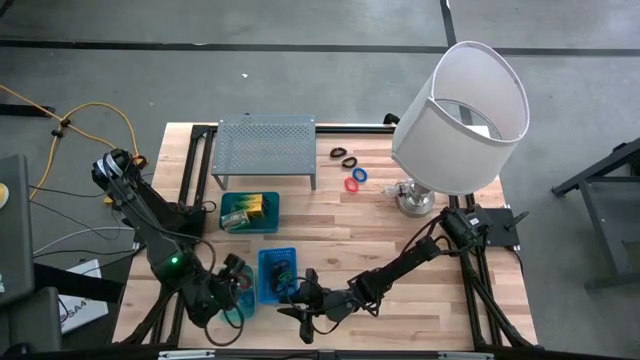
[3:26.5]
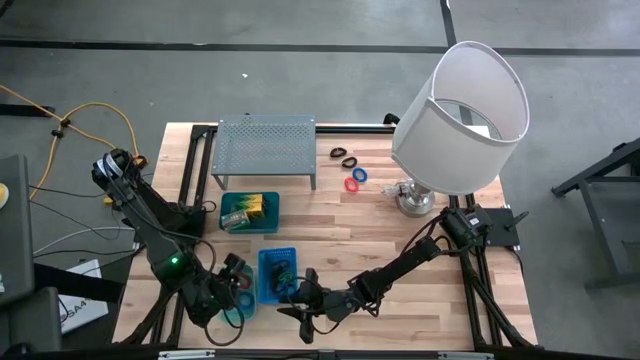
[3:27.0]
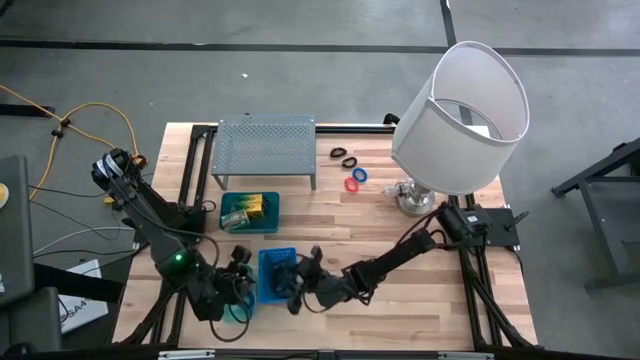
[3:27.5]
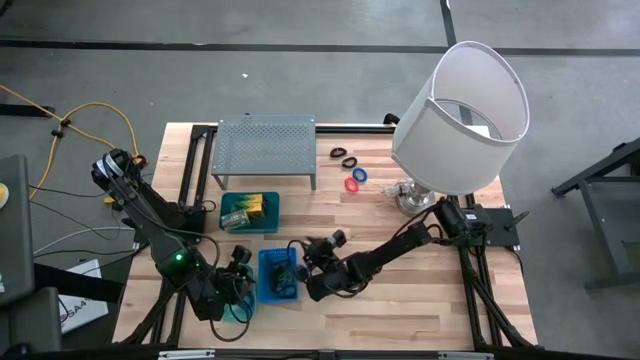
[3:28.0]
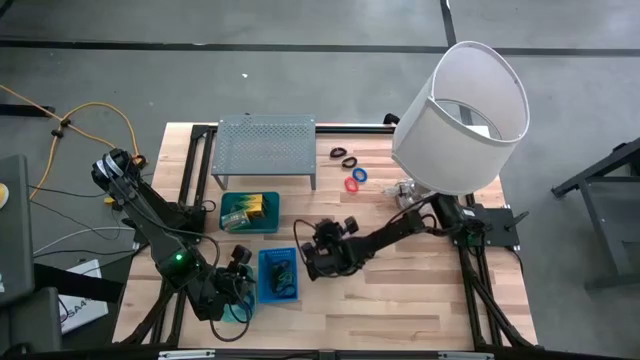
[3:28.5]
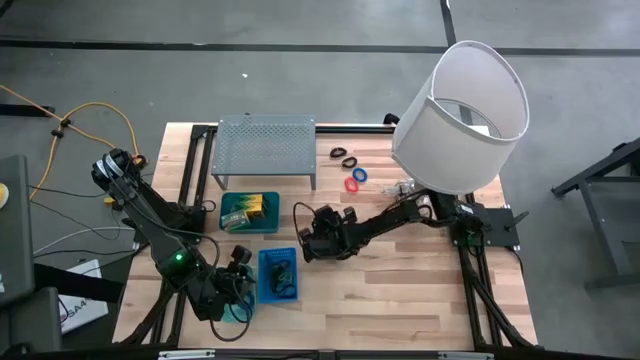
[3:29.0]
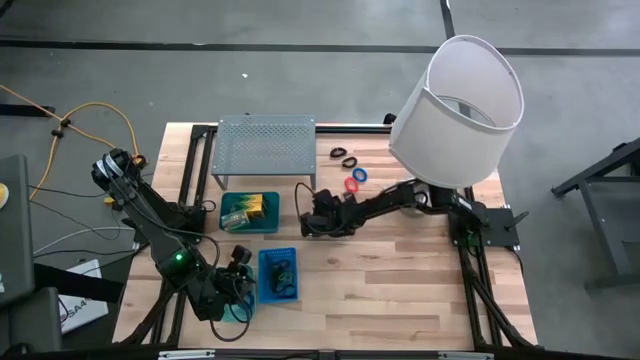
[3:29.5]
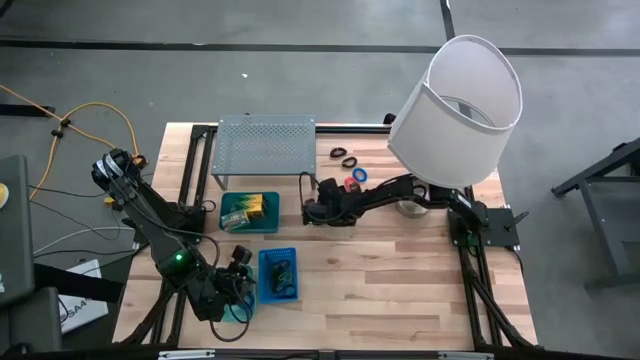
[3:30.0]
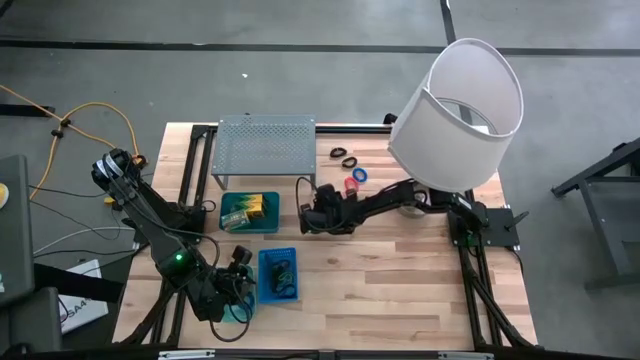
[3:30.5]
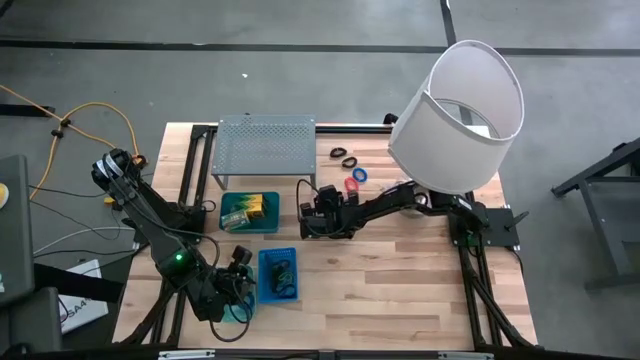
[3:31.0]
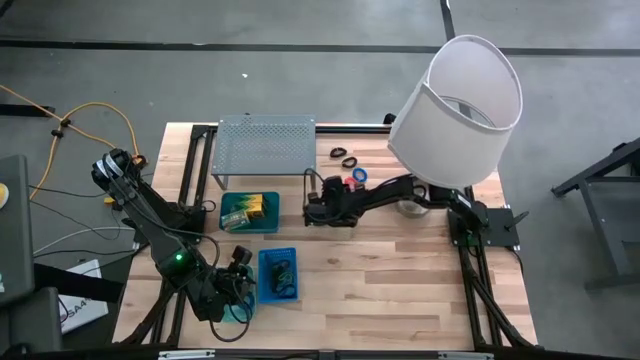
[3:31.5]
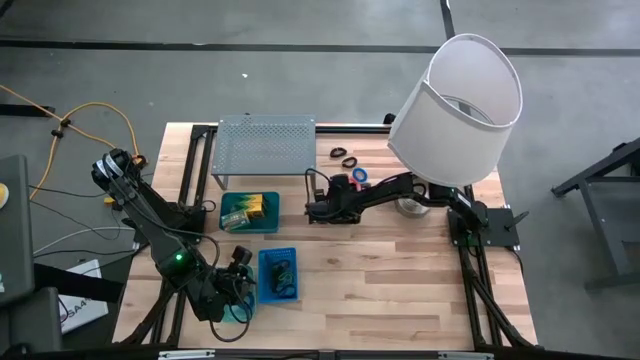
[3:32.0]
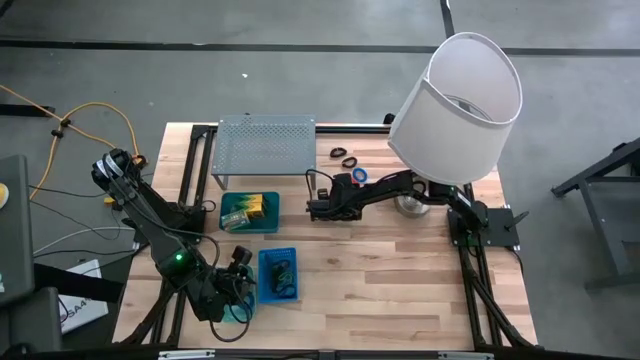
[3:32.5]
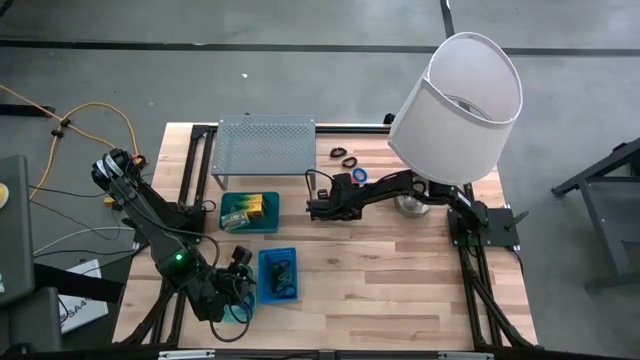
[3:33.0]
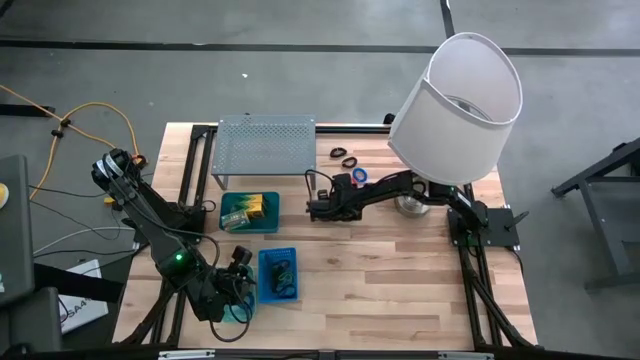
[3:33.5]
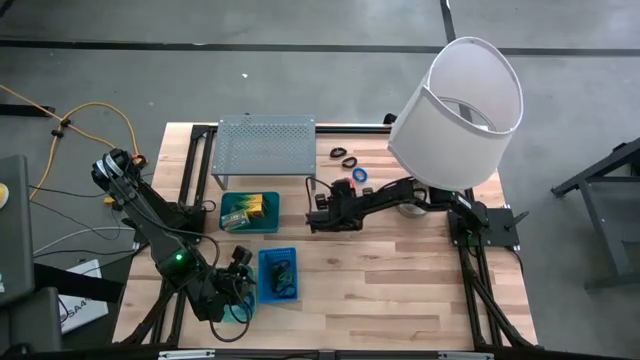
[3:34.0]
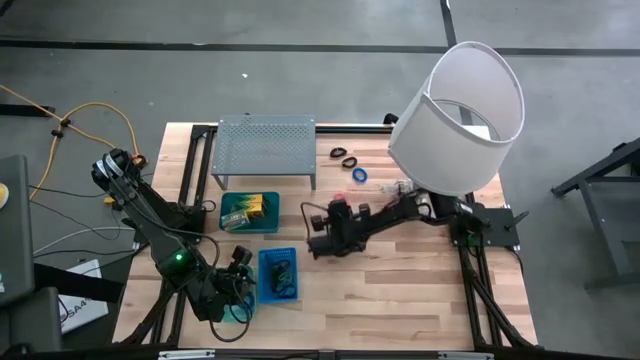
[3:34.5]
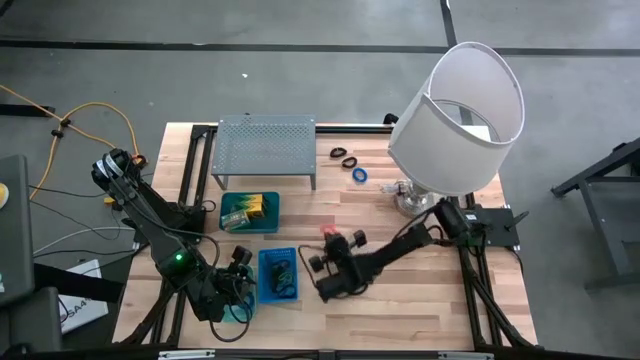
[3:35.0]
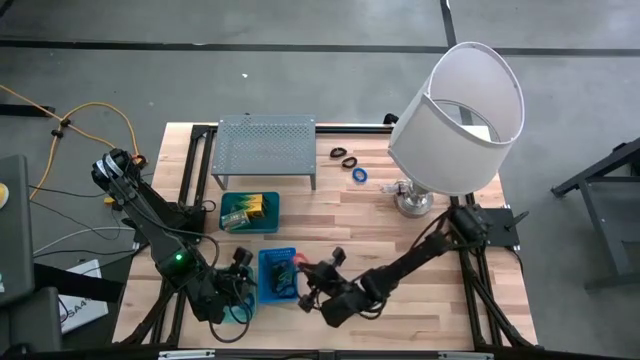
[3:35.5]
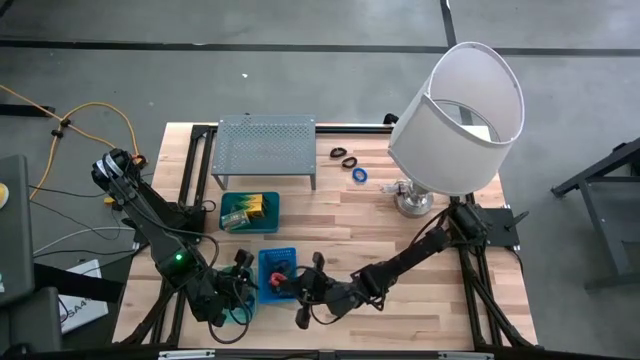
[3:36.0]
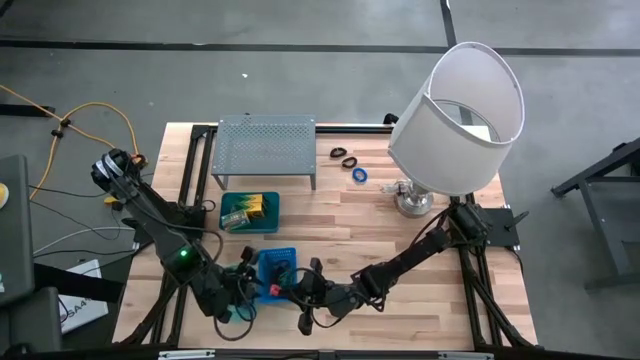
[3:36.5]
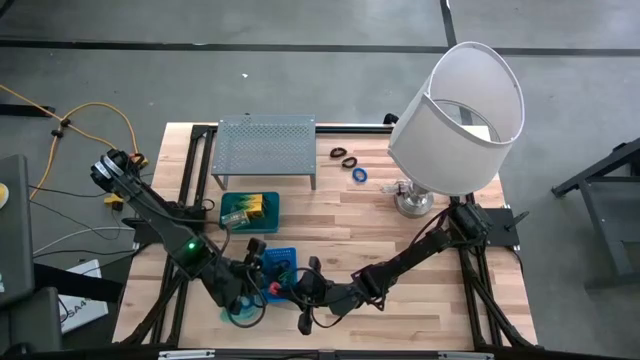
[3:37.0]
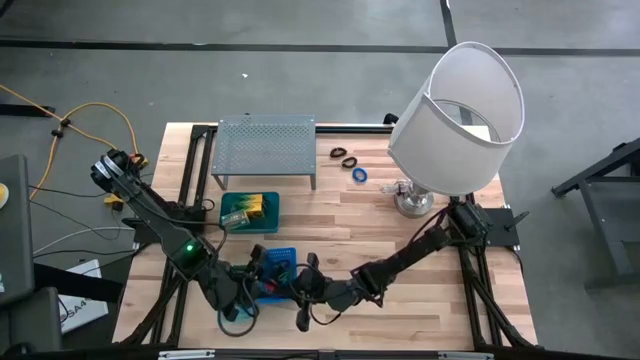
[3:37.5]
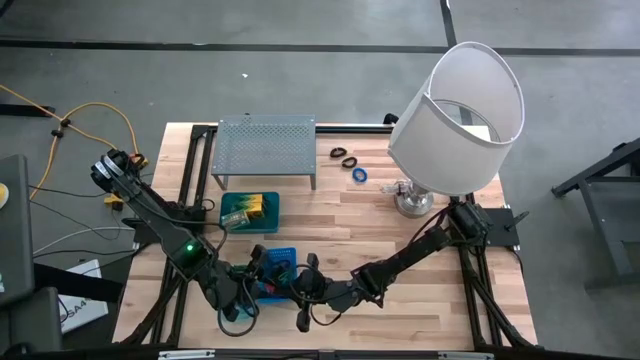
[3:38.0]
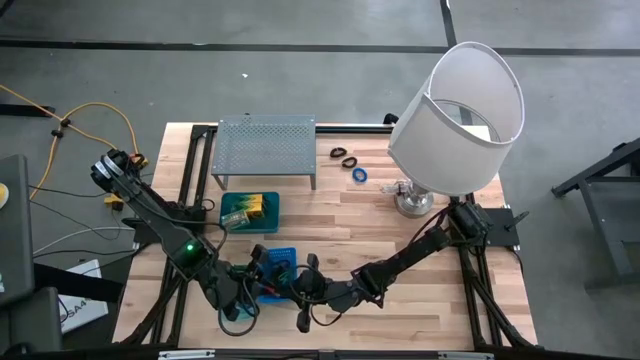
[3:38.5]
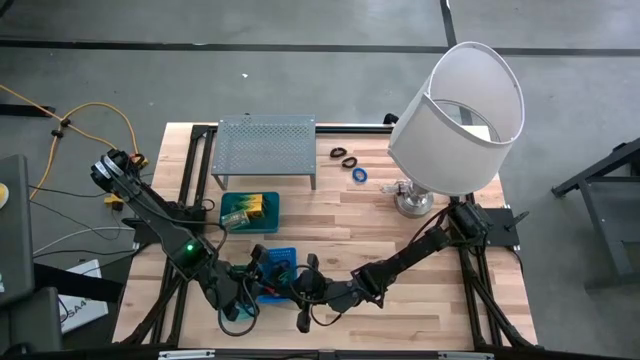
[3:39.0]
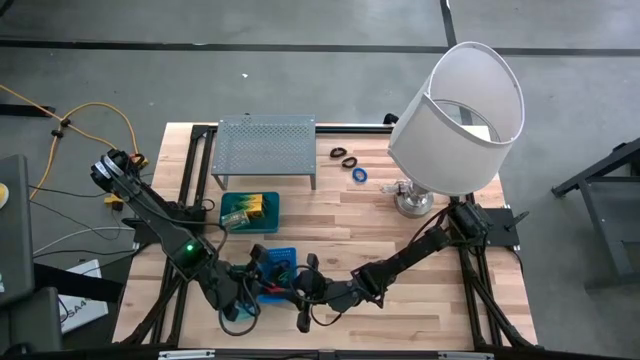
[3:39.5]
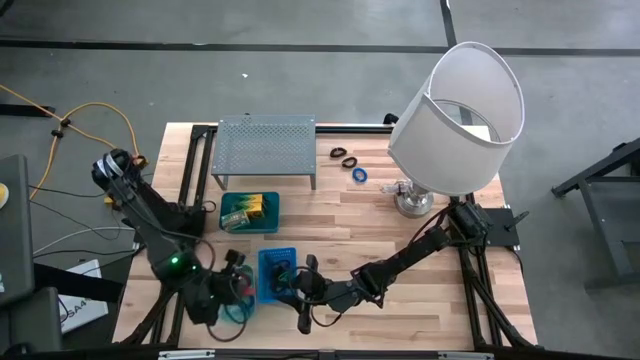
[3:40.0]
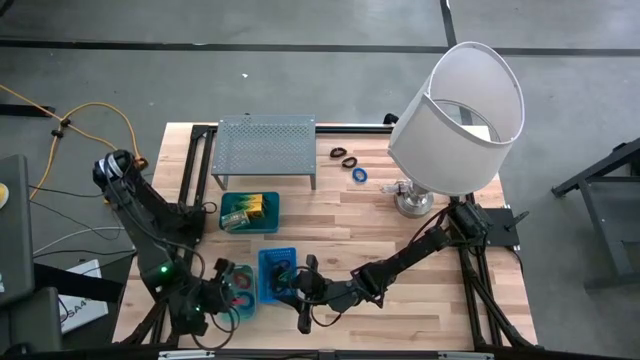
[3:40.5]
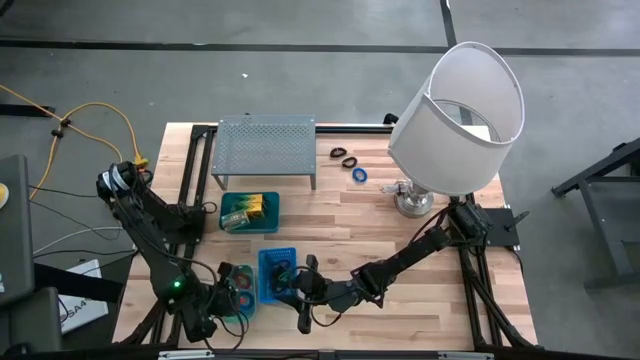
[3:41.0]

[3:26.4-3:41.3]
Task: Pick & Place Office Desk Supplies
Put the orange spring keychain into the green bin

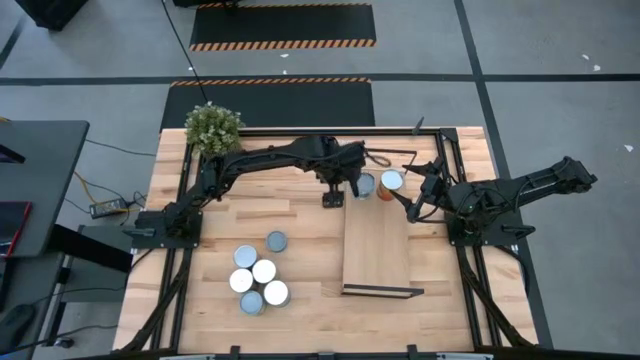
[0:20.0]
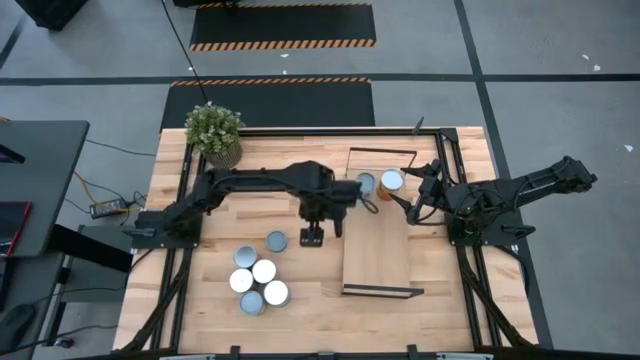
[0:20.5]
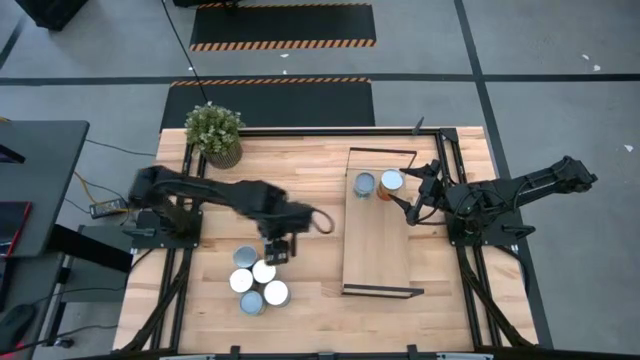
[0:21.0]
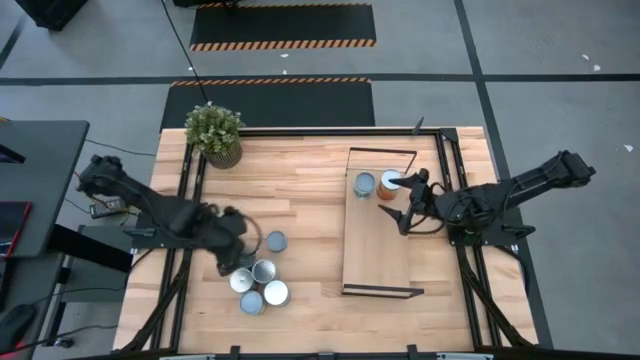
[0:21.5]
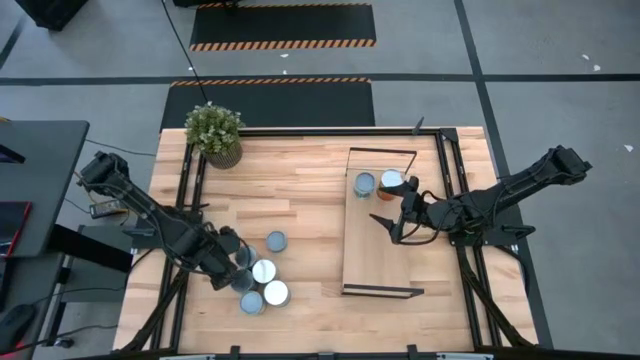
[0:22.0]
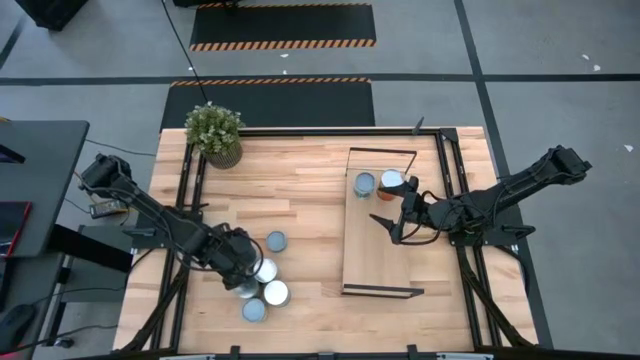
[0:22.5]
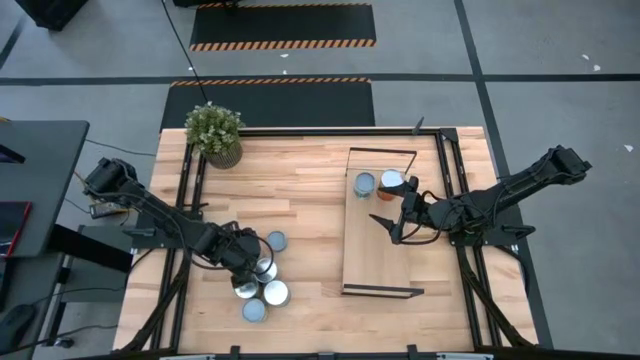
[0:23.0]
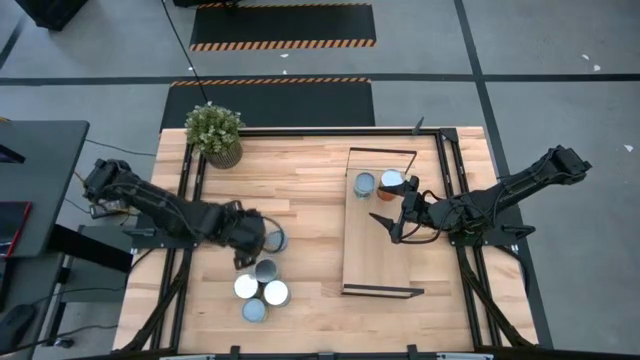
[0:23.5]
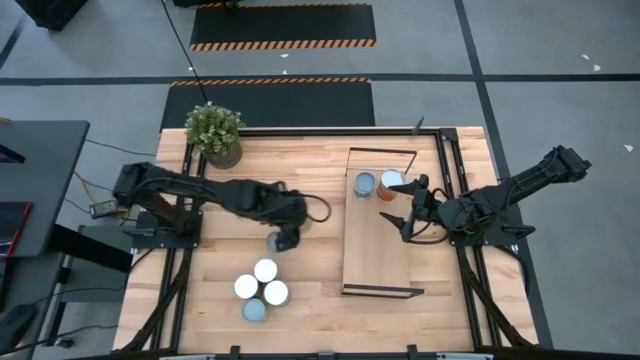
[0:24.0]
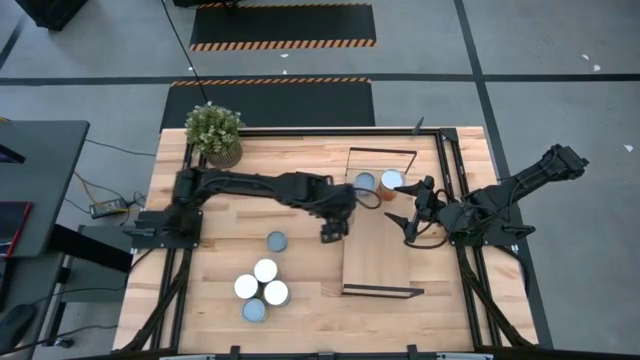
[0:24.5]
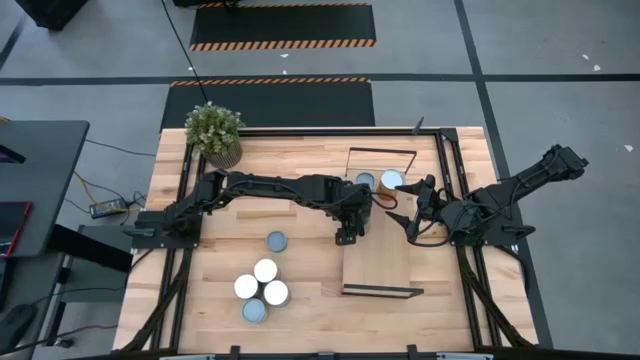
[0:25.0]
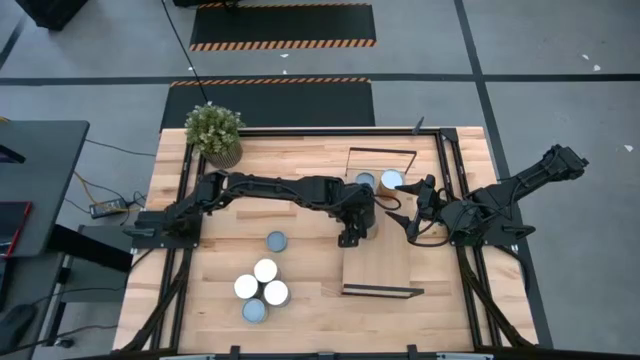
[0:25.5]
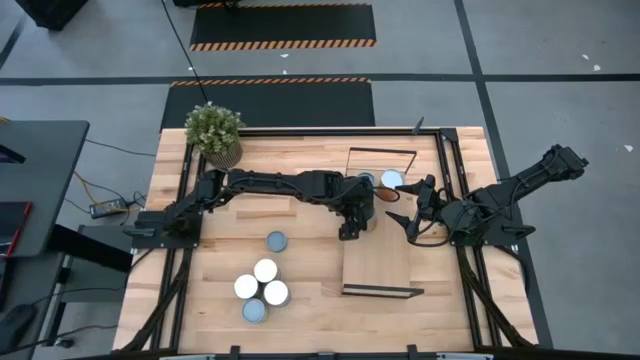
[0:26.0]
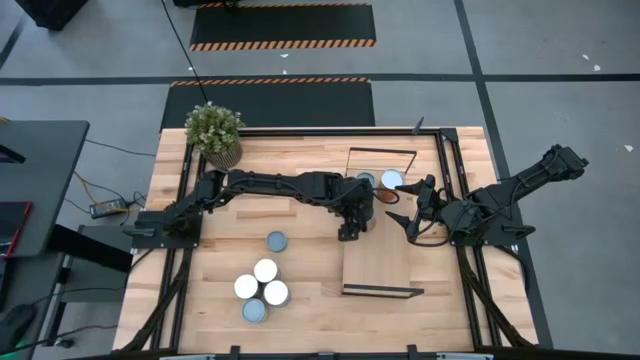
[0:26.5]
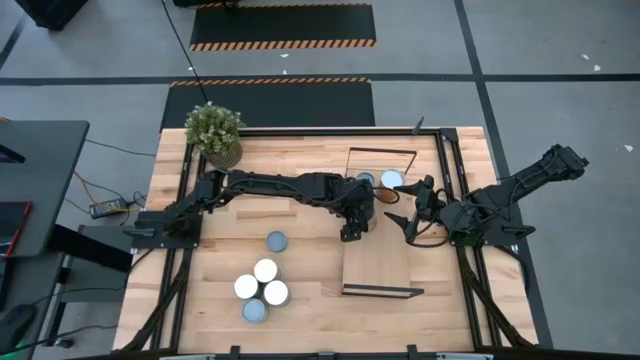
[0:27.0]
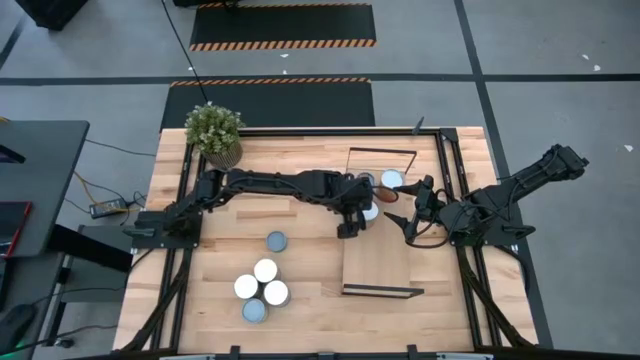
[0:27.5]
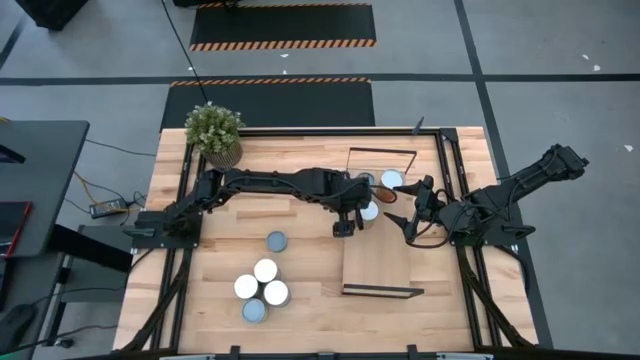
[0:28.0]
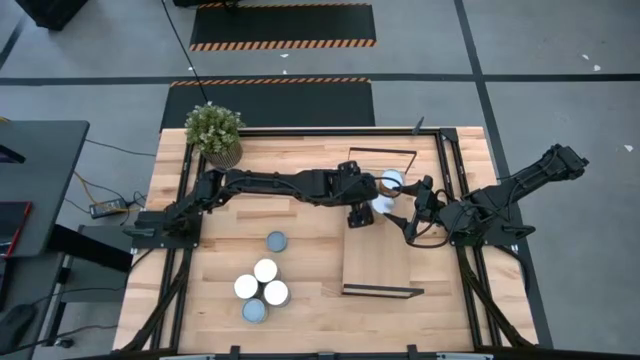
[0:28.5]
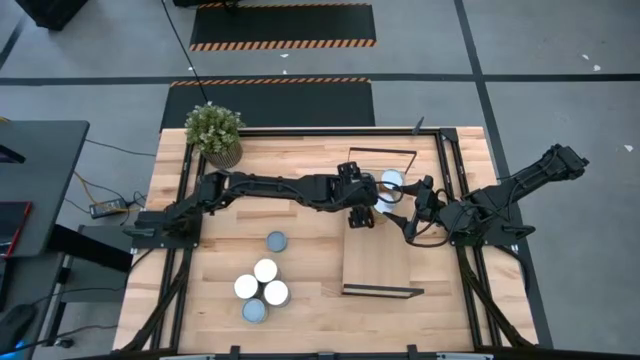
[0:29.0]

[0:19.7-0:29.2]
Task: Pick and place cans onto a shelf
Put the canned pineapple on the shelf
